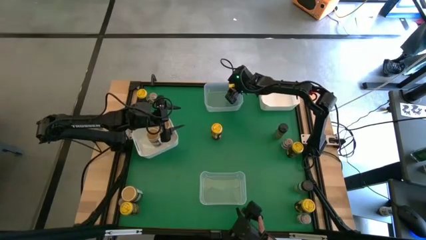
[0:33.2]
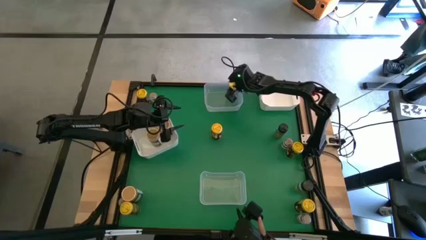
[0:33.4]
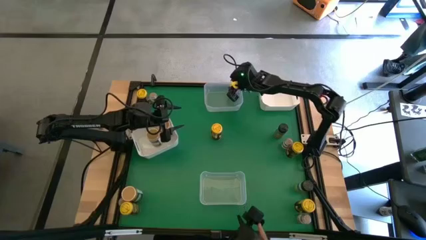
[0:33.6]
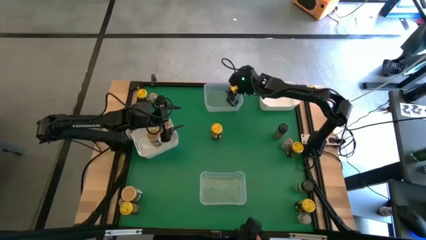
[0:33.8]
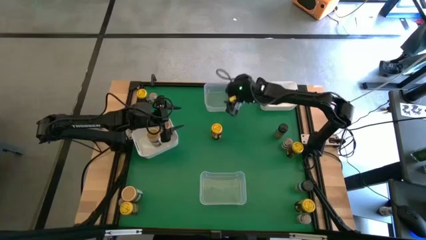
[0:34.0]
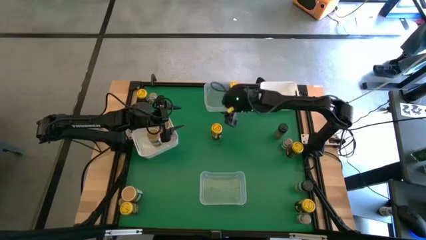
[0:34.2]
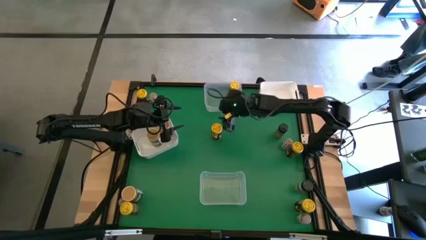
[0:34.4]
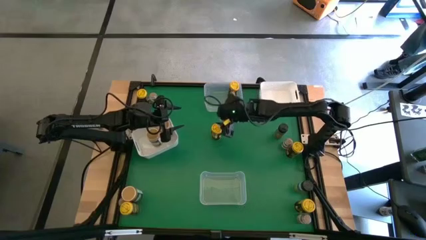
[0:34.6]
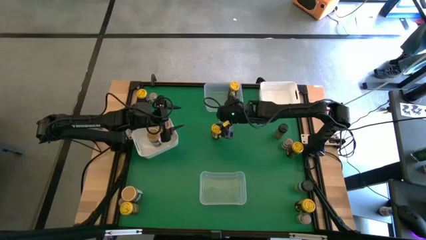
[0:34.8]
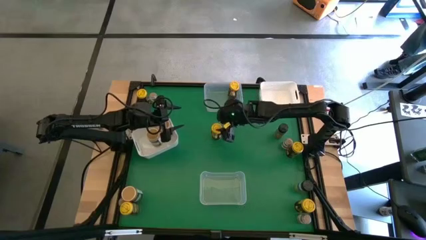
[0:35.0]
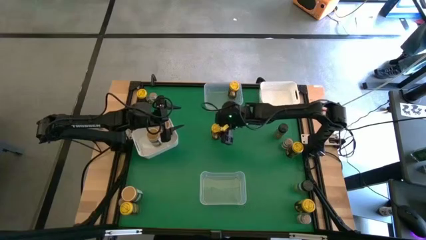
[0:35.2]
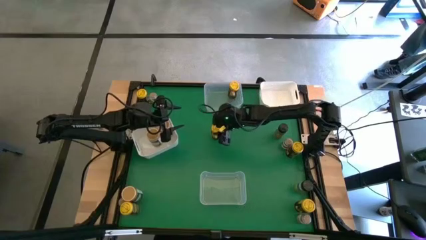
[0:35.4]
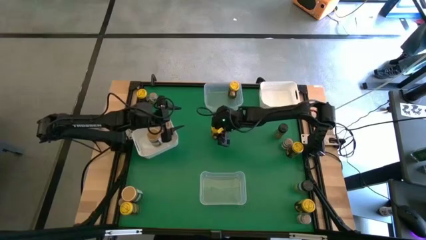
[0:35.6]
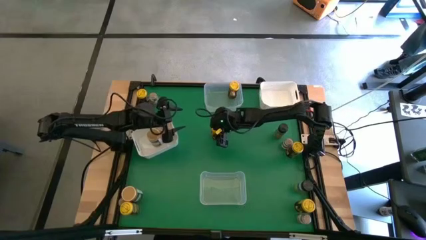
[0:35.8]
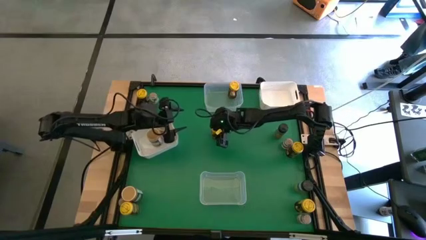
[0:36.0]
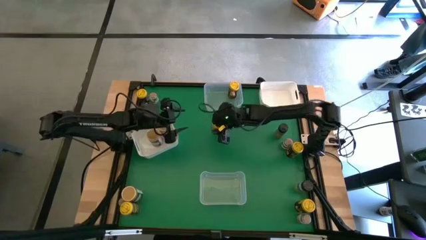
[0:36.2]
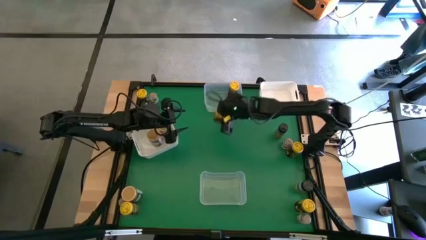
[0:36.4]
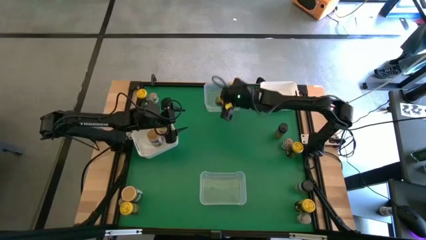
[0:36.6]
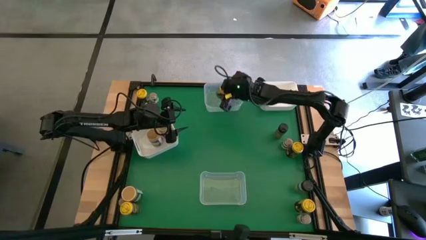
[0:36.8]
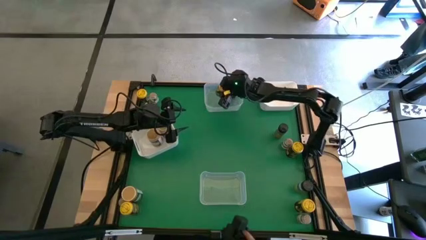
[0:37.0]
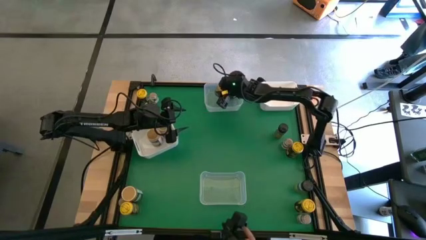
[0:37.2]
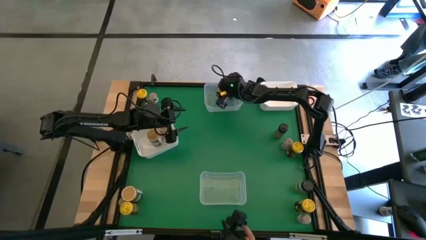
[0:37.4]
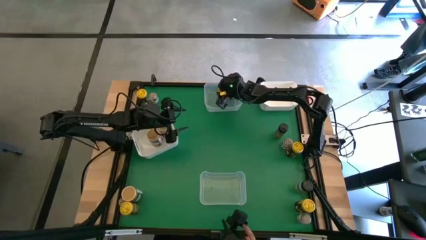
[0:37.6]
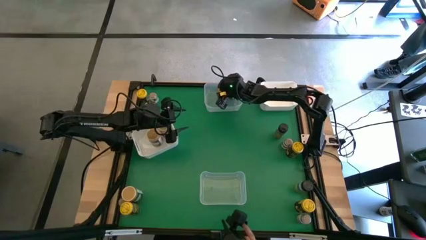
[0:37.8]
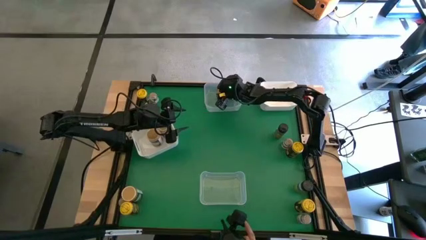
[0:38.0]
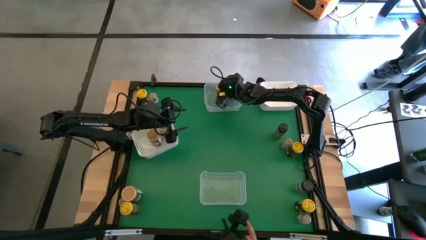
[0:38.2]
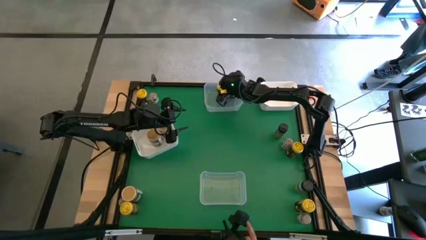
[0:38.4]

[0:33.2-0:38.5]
Task: Sort spices by type
Put the yellow spice bottle into the top transparent bin

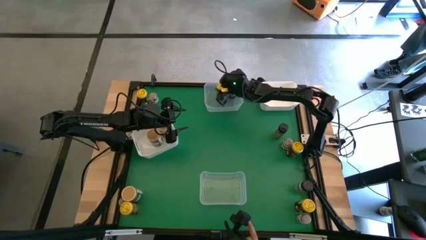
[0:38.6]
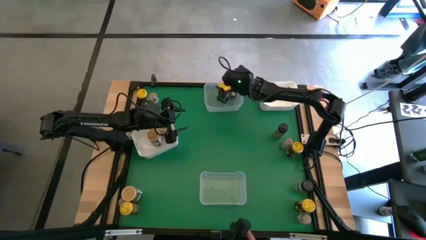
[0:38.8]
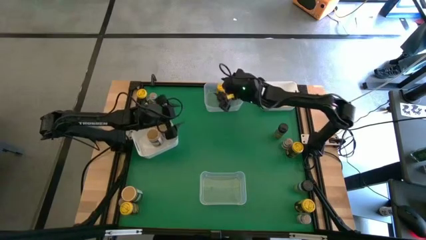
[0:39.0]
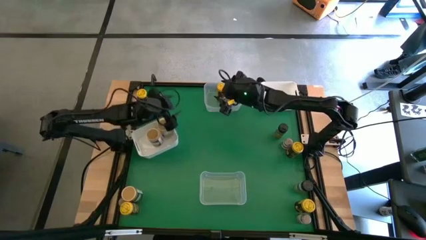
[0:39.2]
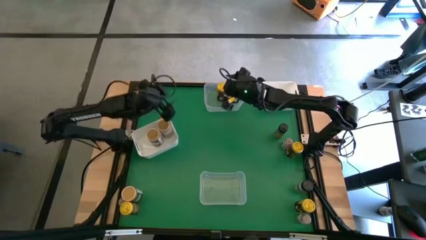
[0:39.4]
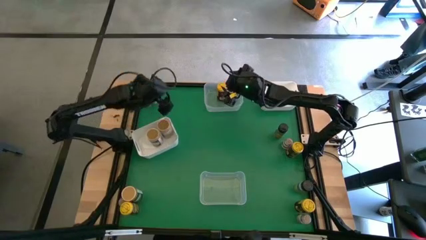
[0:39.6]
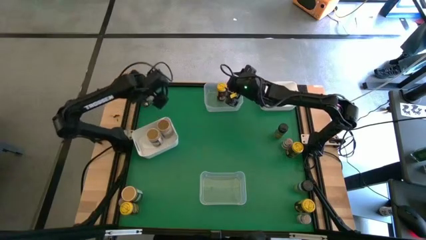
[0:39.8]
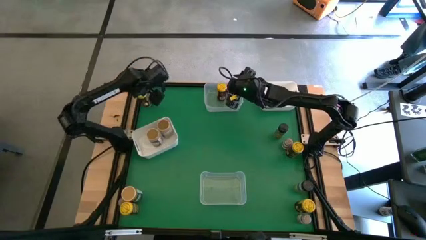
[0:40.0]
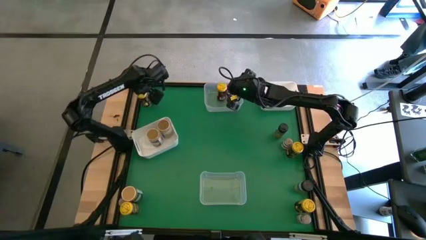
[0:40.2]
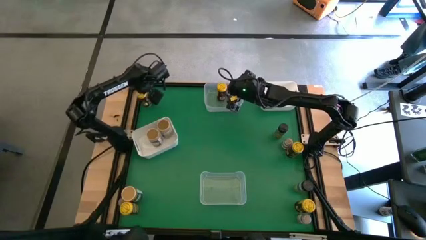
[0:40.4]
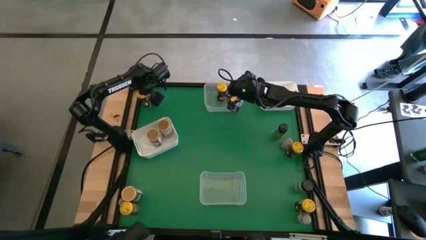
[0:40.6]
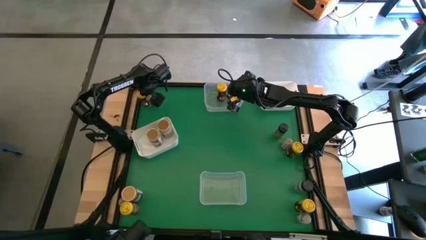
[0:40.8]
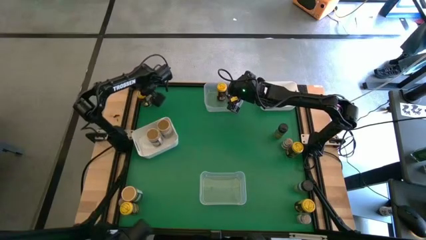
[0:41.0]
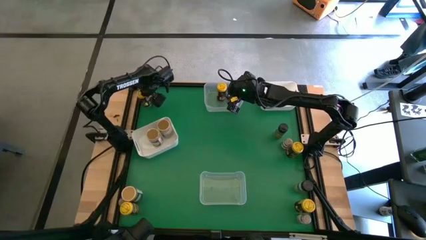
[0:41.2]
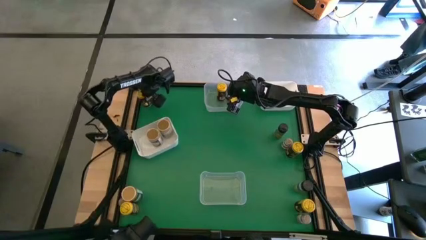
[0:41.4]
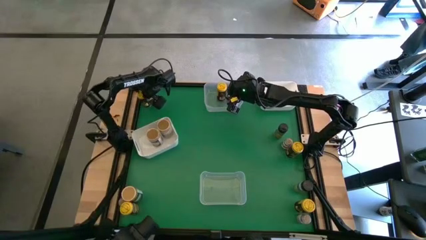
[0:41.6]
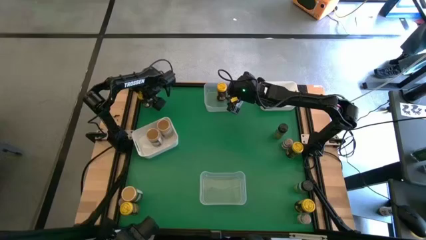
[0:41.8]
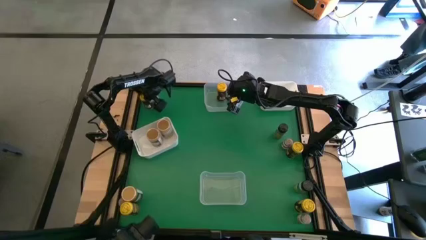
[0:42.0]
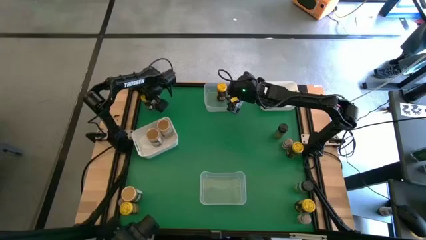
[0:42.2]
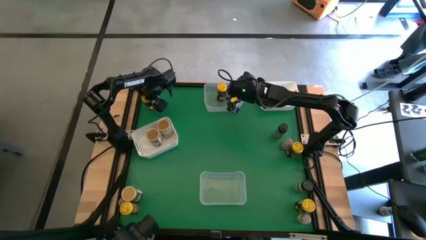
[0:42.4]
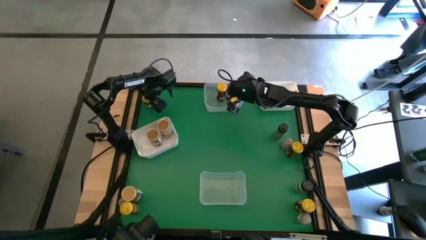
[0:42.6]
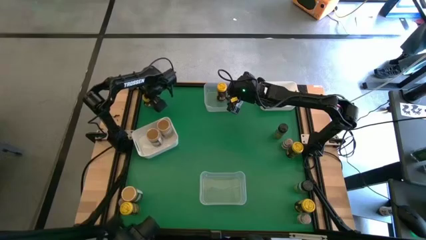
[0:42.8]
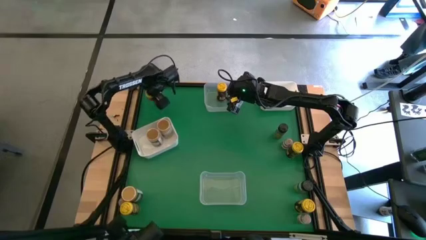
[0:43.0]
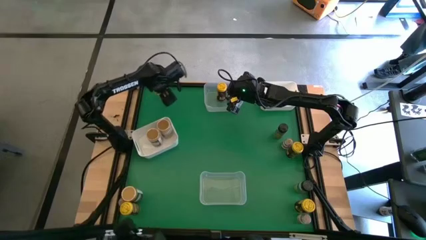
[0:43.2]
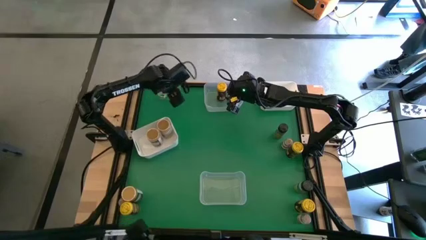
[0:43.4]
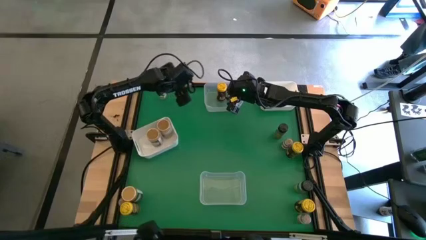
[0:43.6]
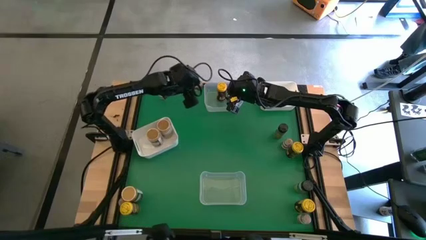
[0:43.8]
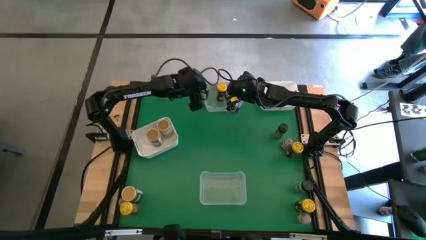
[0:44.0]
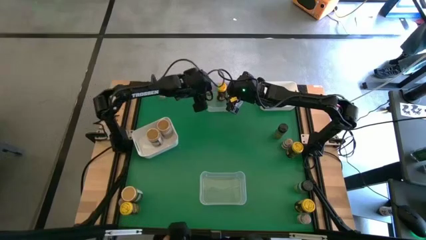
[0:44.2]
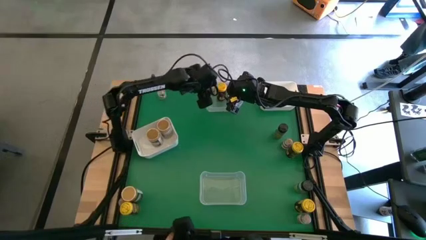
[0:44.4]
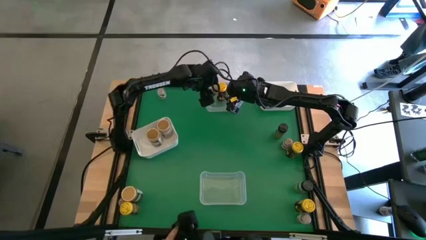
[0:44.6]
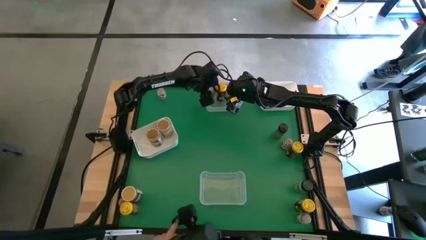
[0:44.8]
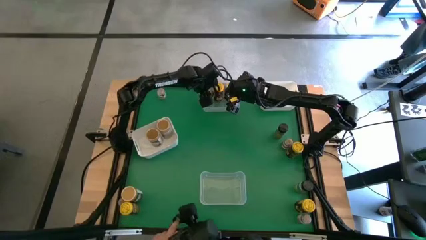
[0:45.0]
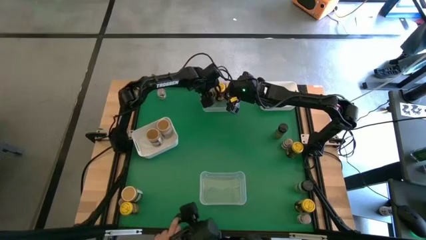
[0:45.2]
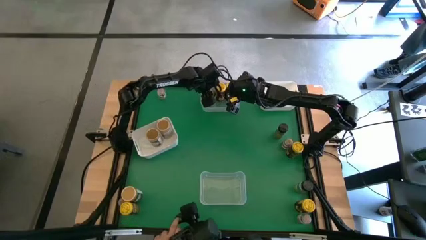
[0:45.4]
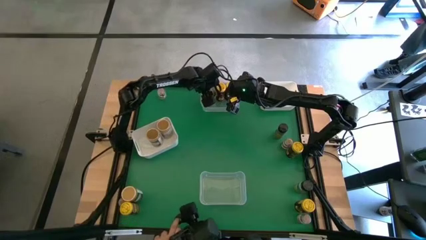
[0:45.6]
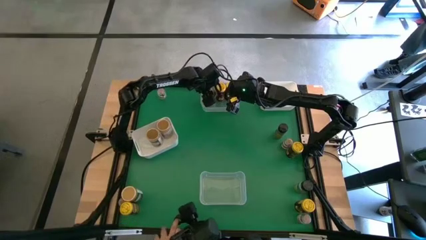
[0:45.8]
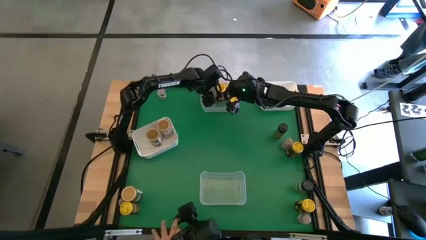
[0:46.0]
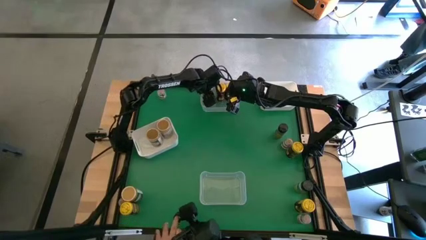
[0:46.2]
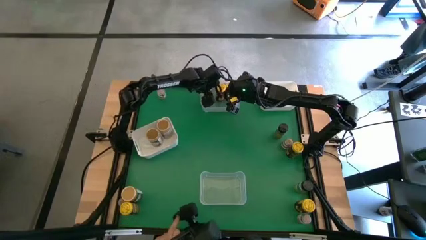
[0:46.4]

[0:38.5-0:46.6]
Put the yellow spice bottle into the top transparent bin

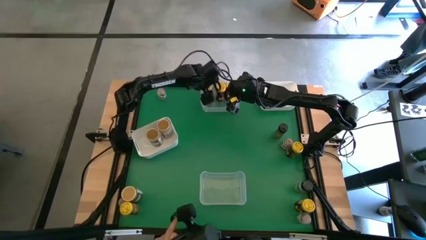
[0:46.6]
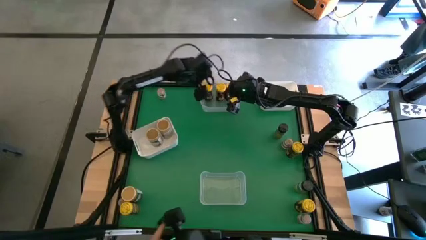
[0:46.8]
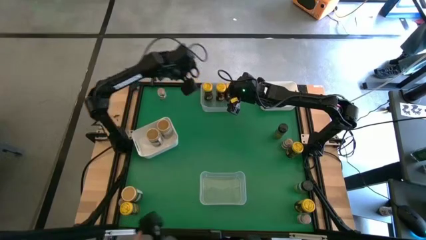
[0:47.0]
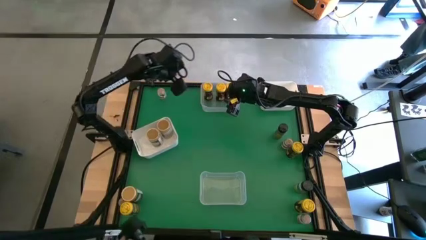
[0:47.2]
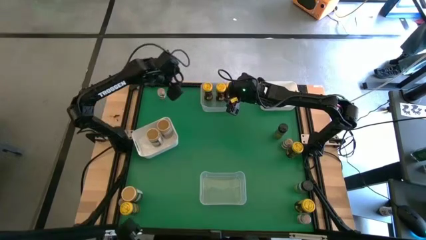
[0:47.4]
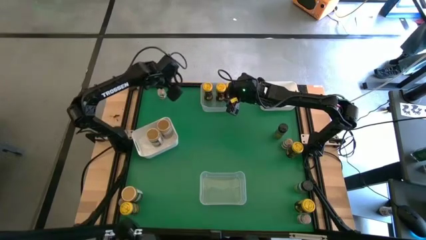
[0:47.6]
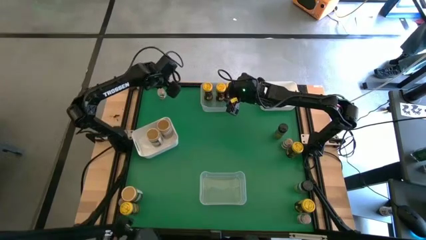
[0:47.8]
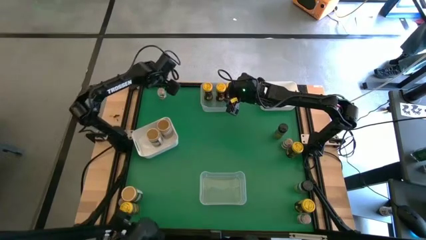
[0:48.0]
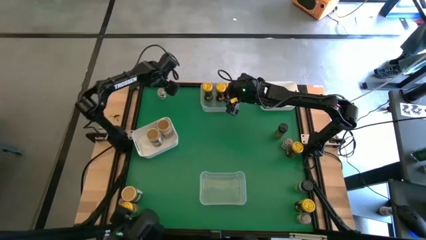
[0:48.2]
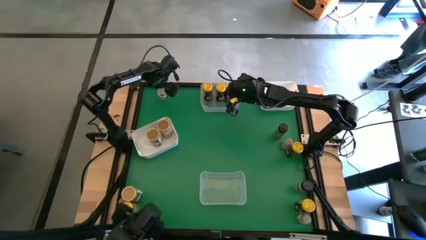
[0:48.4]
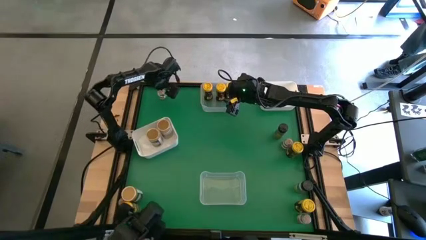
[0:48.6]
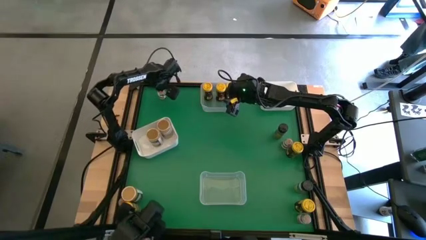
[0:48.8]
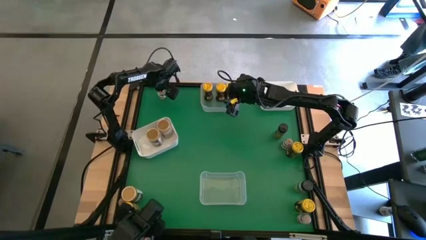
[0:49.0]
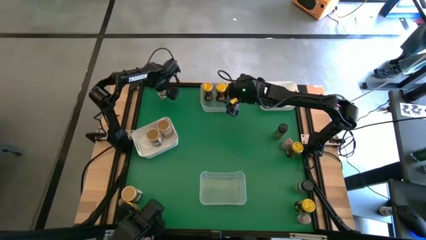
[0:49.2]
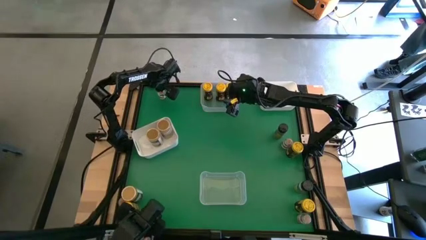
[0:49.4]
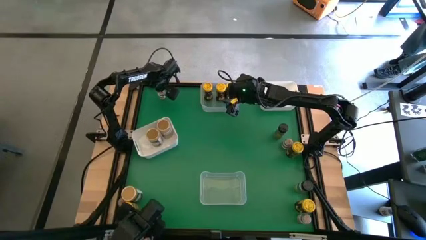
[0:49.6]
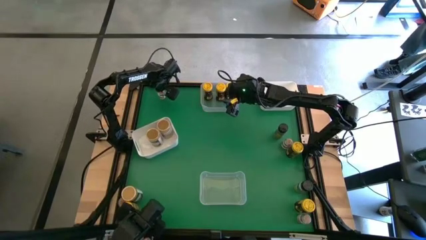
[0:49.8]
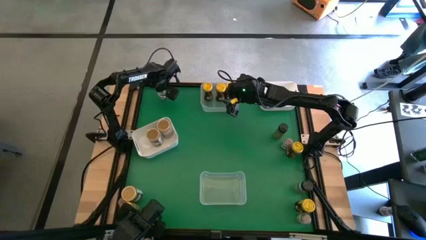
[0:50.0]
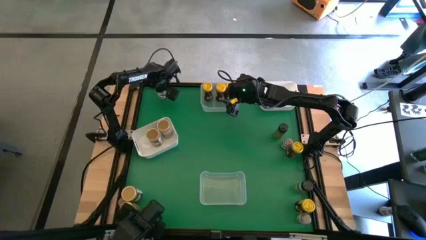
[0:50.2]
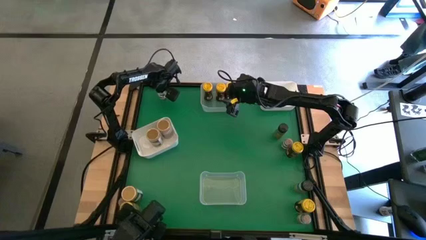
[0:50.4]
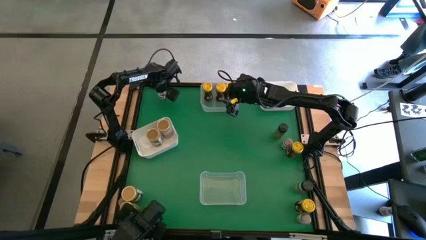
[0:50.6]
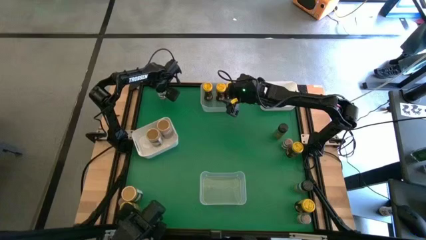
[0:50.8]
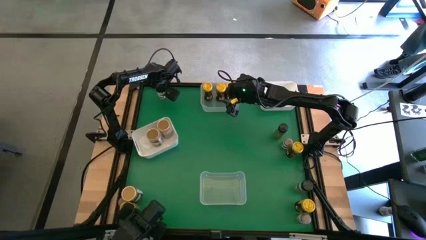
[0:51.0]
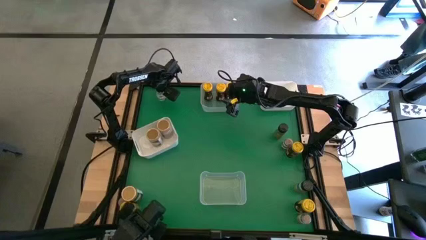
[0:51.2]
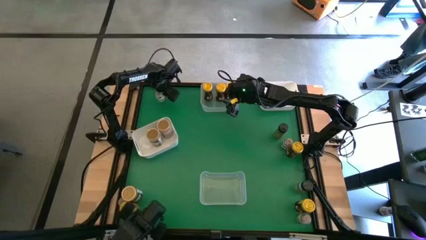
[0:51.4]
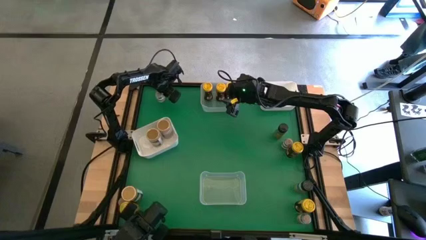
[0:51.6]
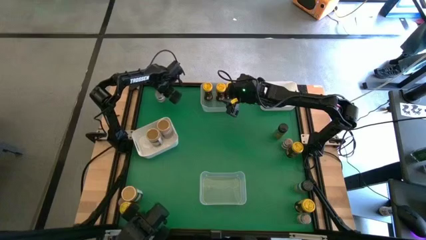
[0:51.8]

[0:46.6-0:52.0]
Put the brown spice bottle into the bottom transparent bin
